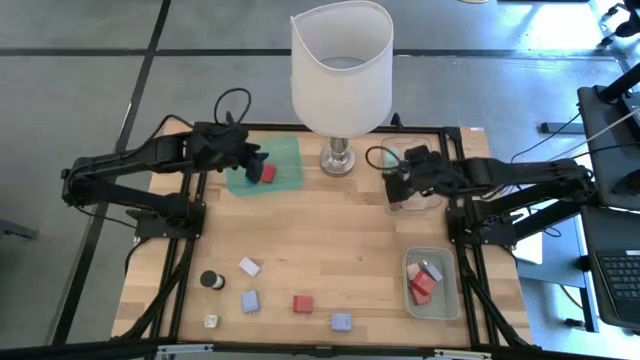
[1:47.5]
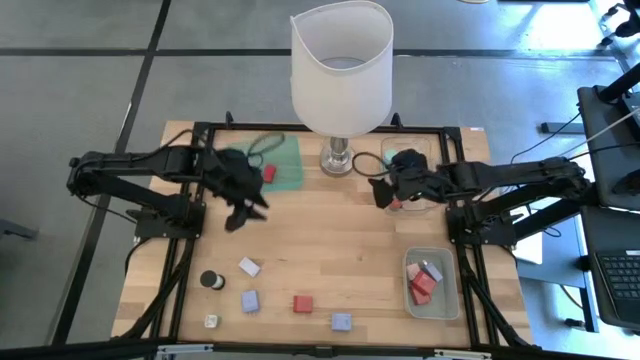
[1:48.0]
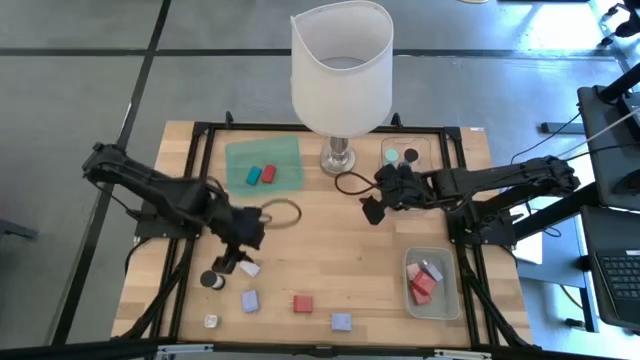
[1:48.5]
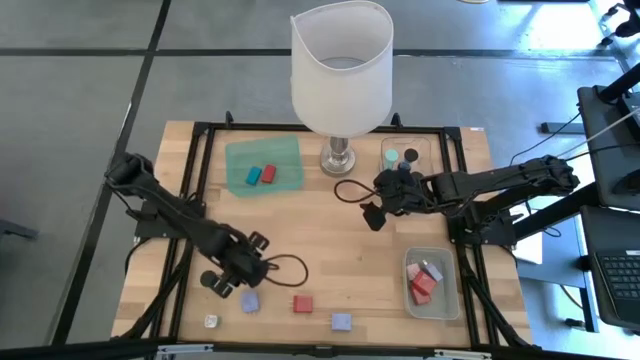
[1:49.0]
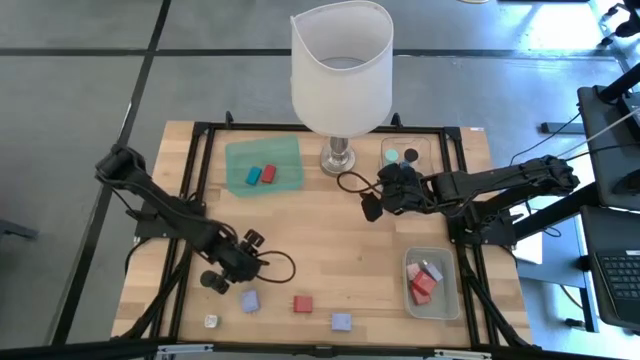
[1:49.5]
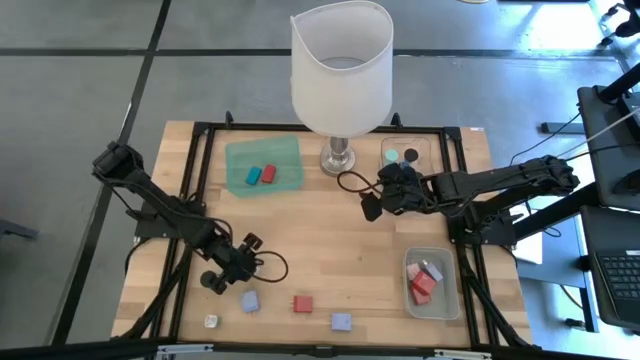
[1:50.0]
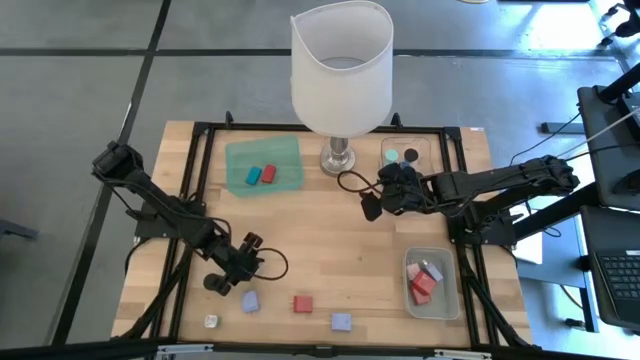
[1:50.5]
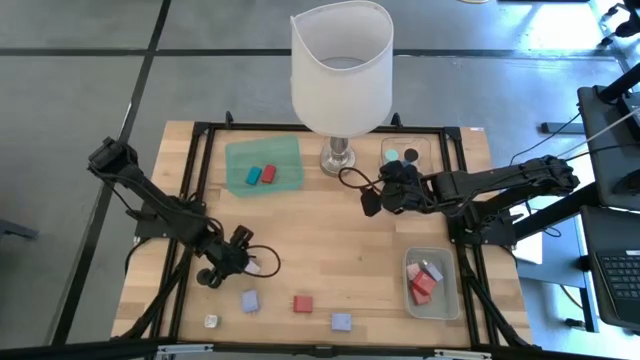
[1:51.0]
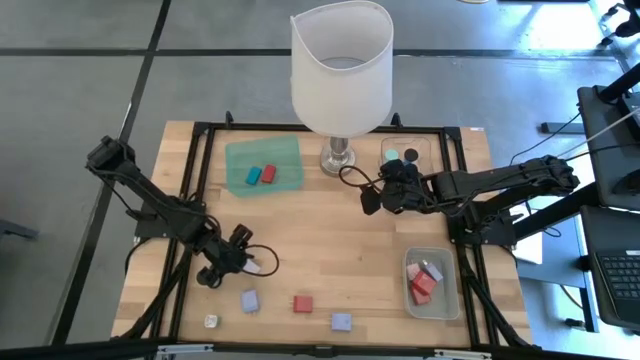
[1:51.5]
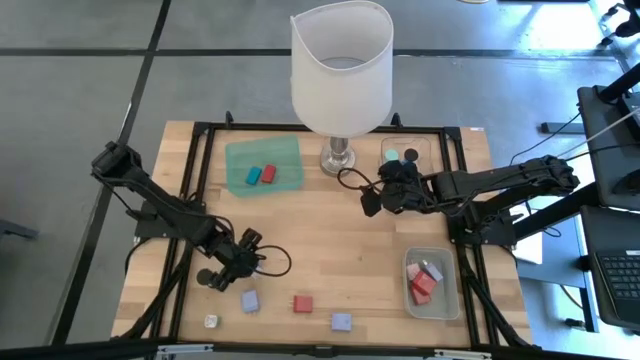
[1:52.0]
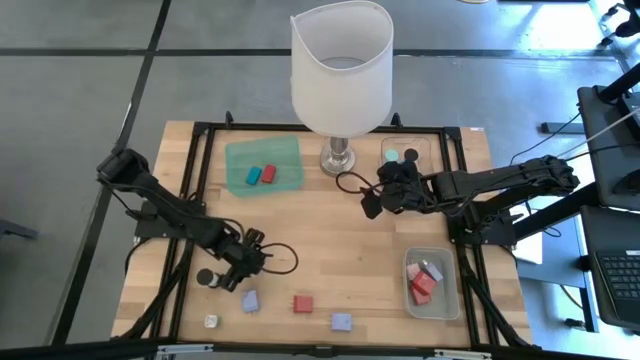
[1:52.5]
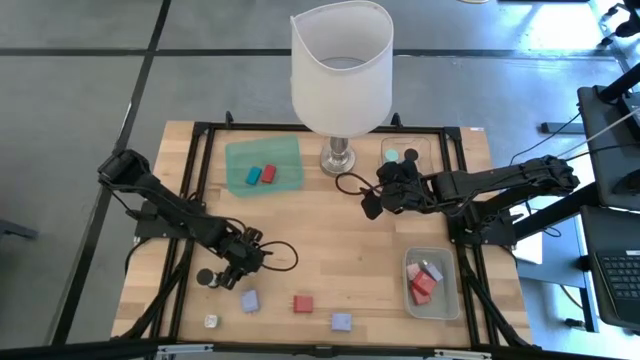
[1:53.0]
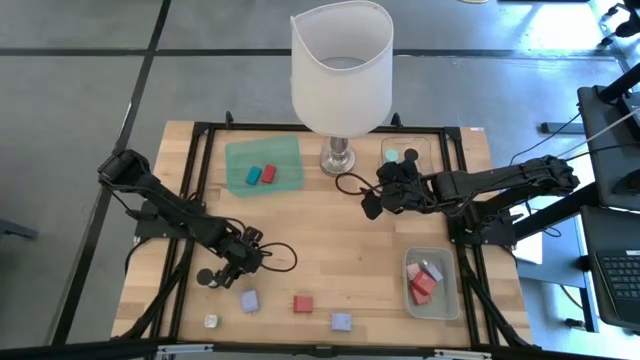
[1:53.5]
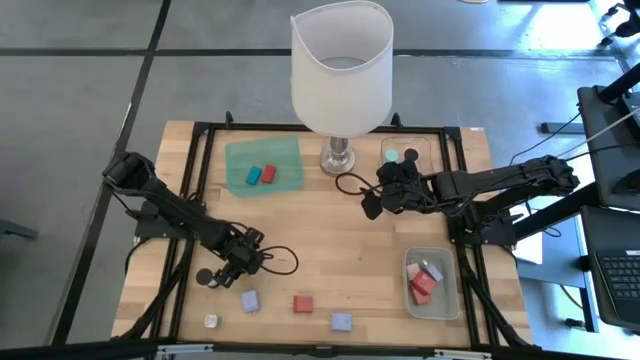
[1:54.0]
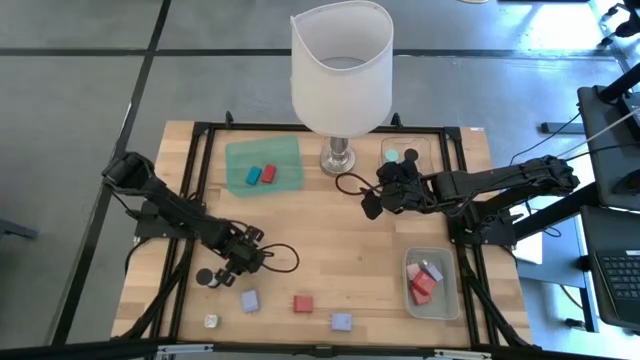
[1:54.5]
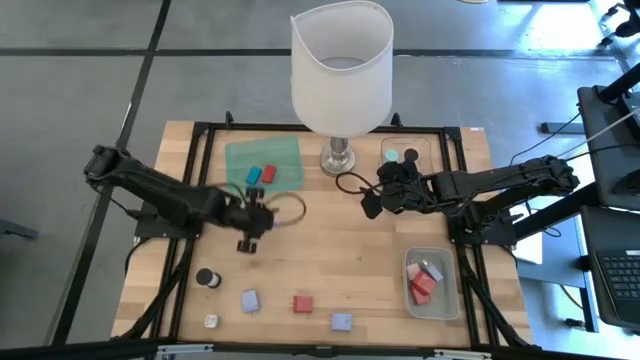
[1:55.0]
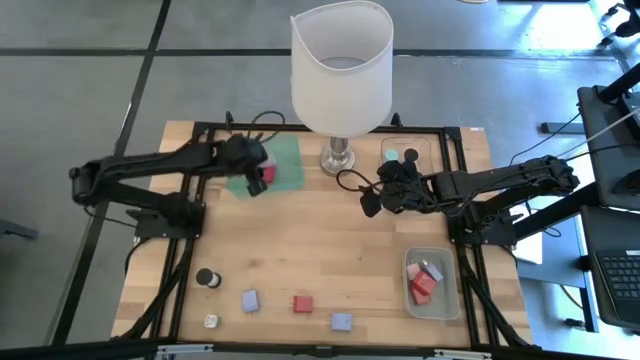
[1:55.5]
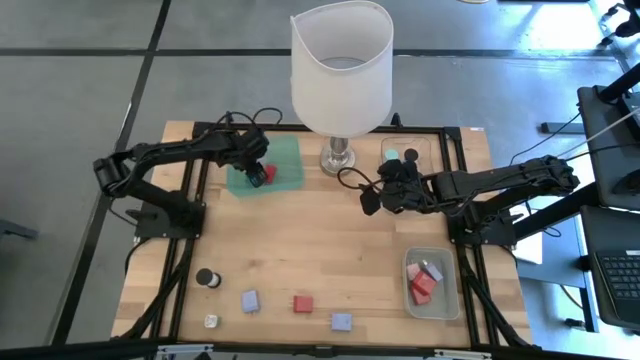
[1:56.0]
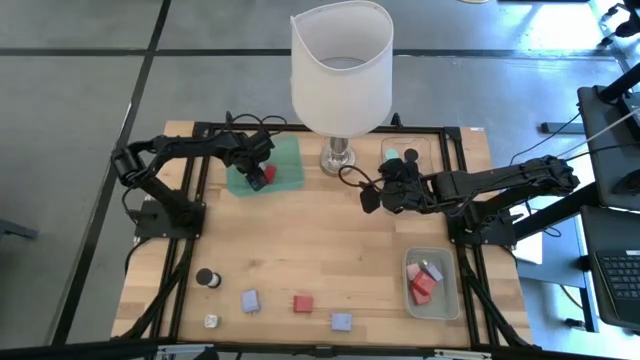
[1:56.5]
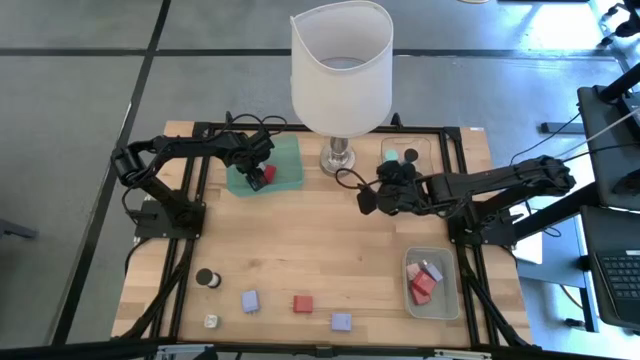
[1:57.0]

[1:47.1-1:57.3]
Task: Pick & Place Office items
Put the white digital timer into the green bin

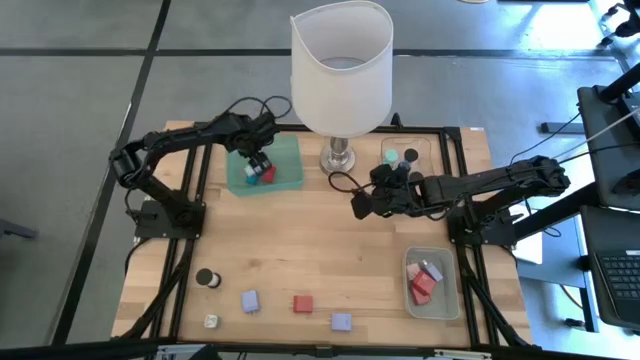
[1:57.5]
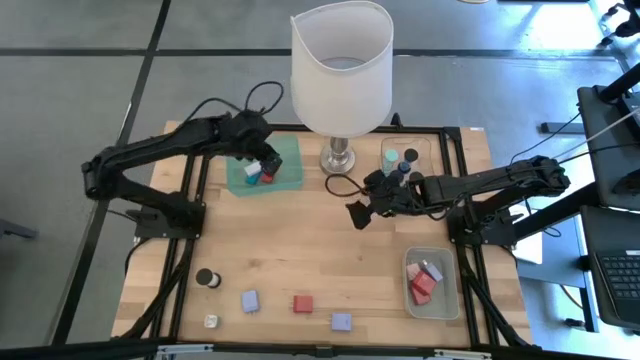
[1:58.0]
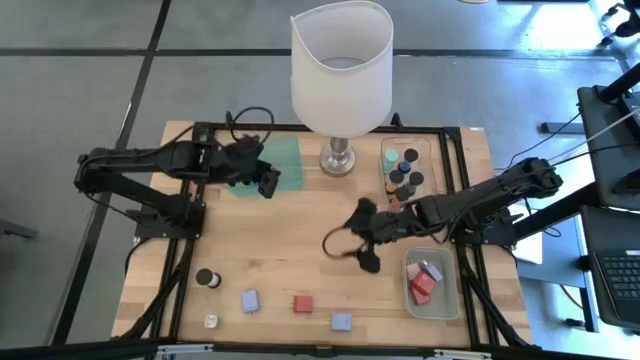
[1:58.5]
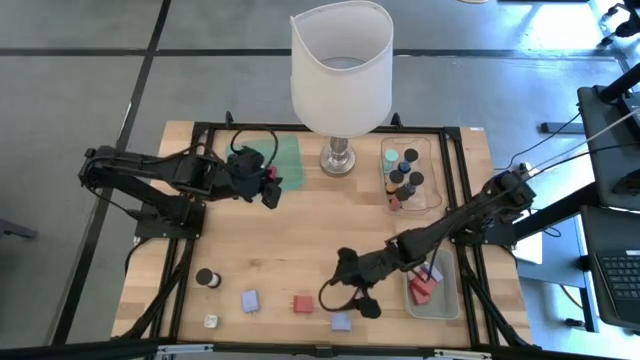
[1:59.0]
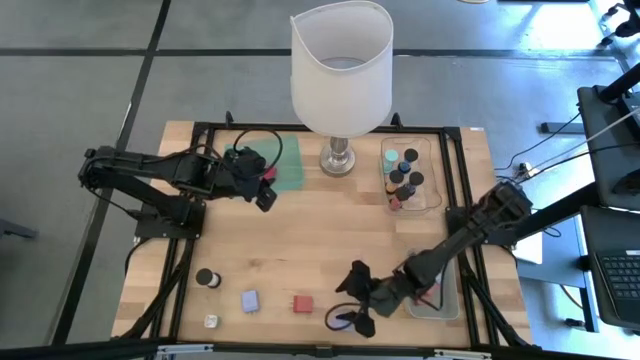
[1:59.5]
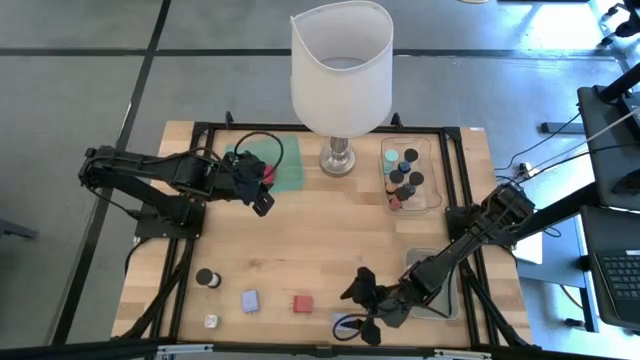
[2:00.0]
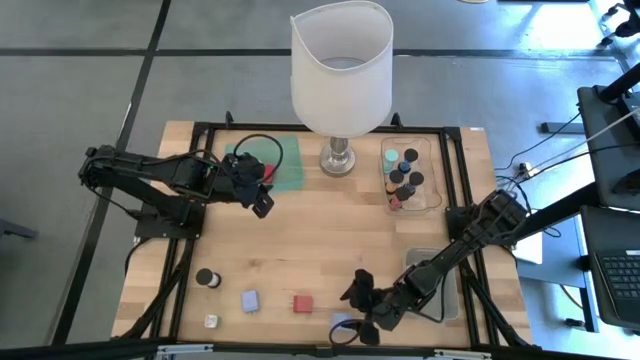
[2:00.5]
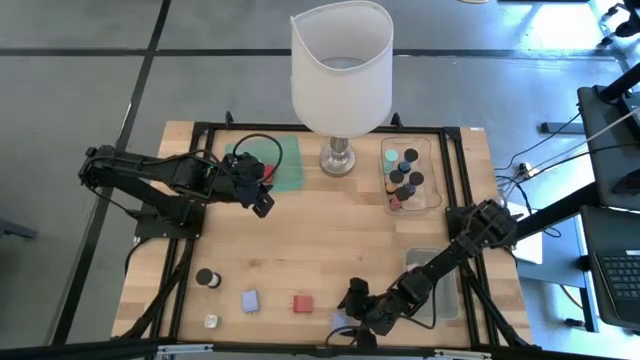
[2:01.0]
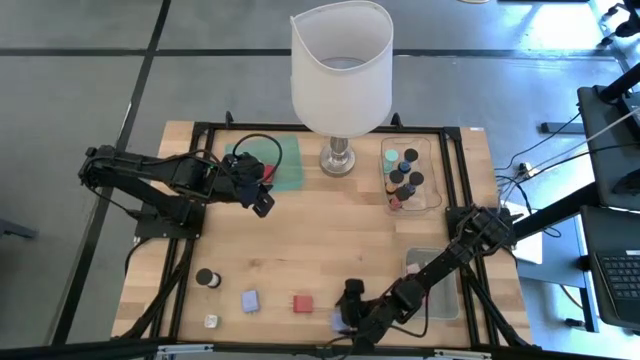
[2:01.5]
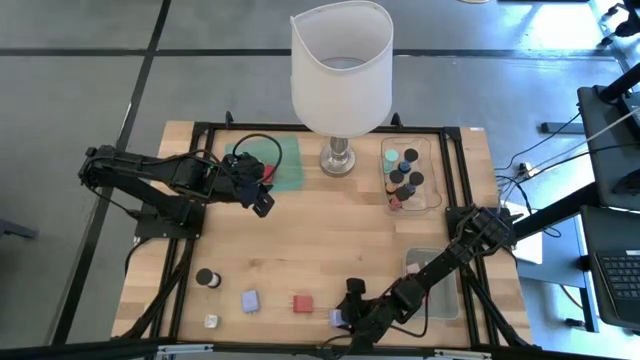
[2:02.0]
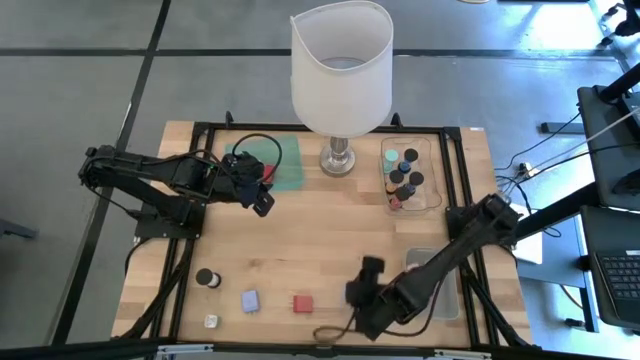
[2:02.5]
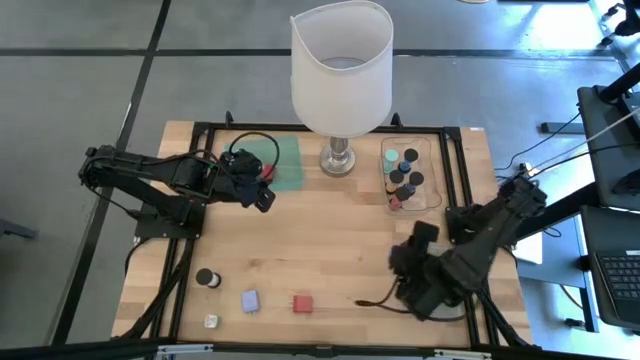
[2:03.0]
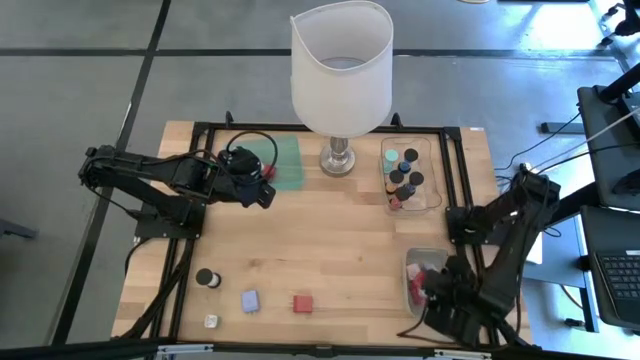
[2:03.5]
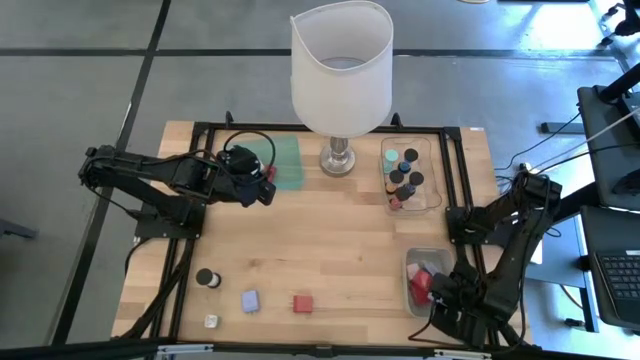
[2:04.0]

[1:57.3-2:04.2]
Put the right violet charger adapter into the gray bin

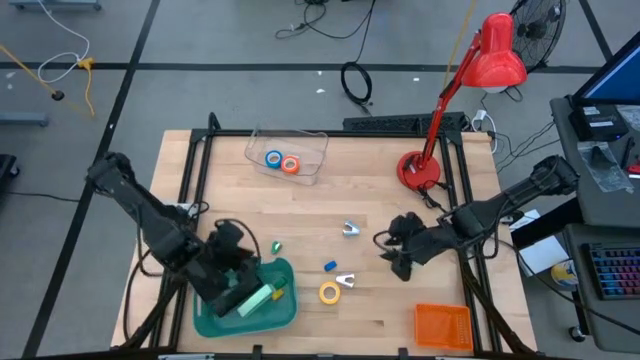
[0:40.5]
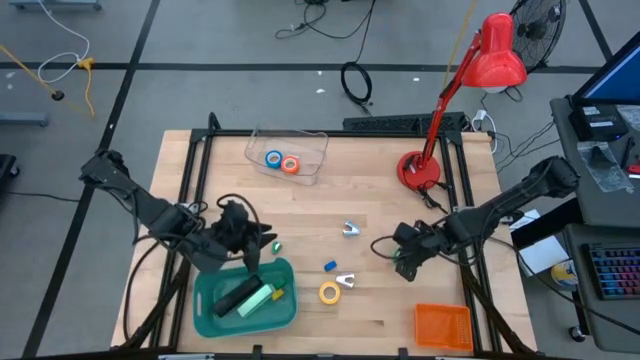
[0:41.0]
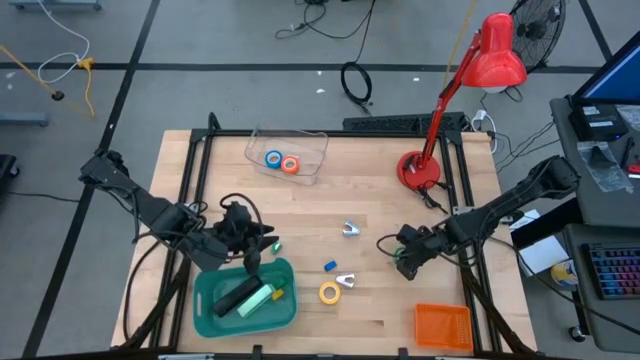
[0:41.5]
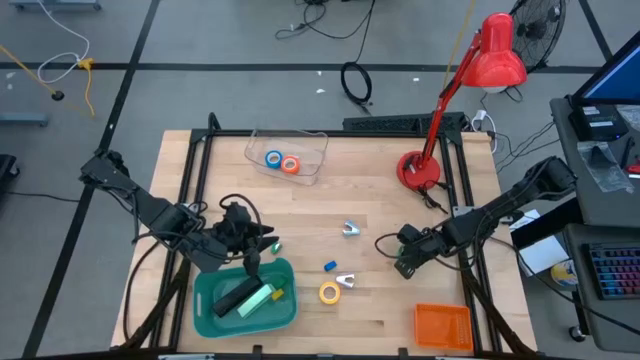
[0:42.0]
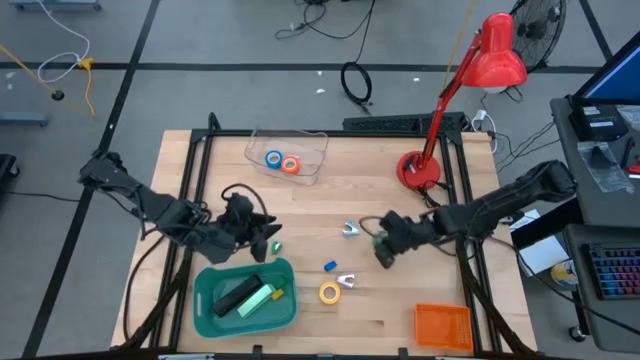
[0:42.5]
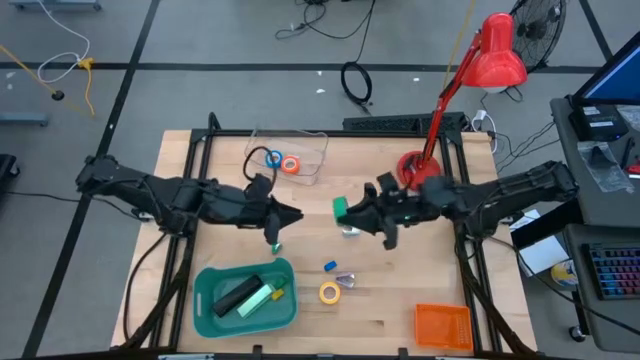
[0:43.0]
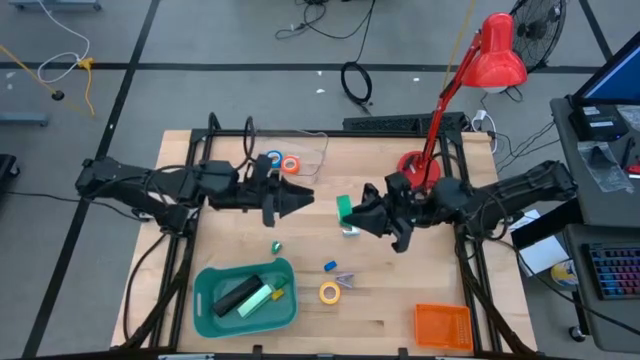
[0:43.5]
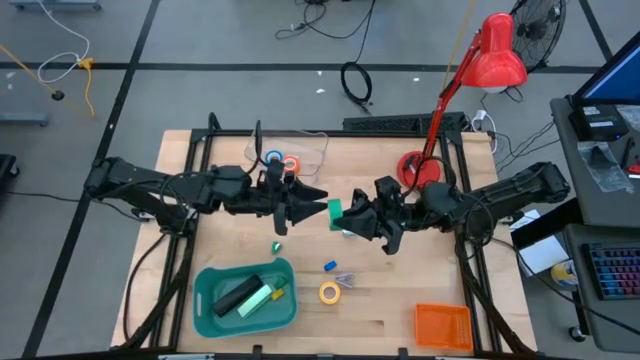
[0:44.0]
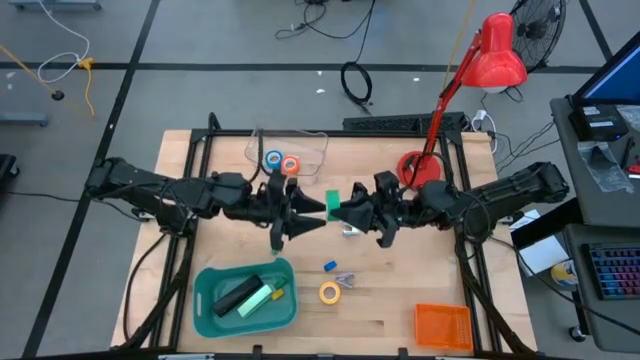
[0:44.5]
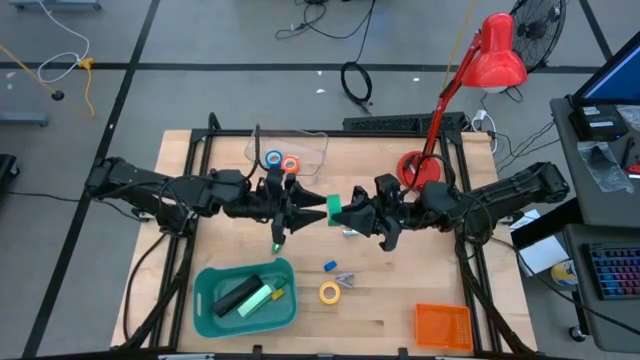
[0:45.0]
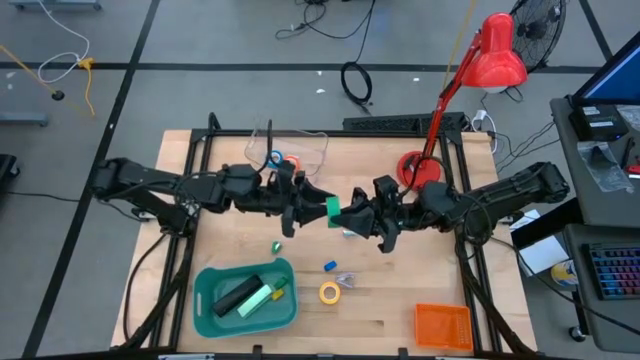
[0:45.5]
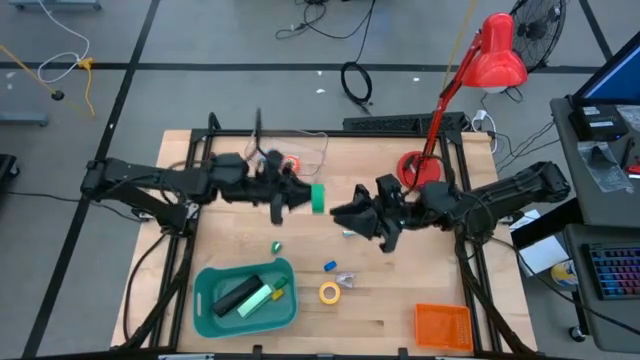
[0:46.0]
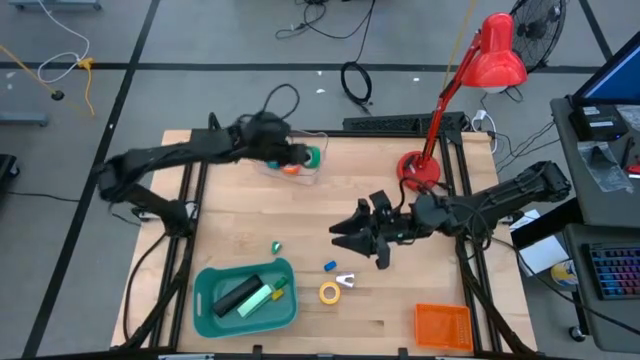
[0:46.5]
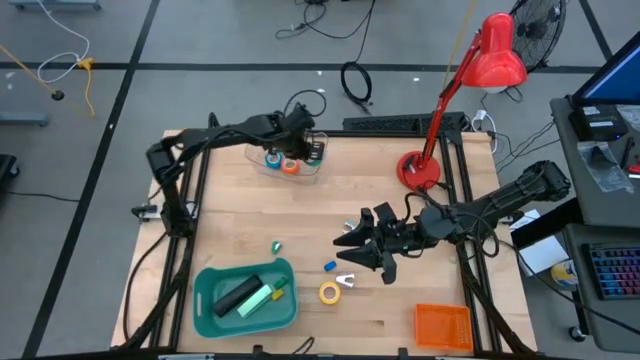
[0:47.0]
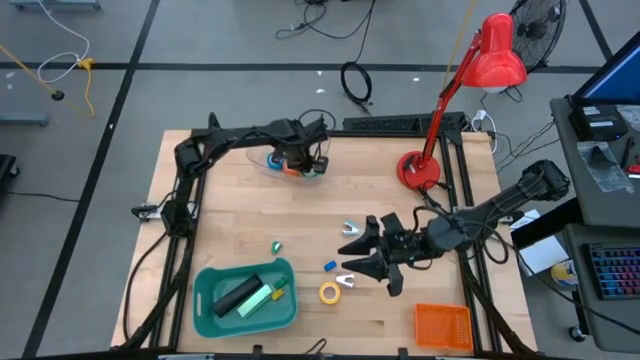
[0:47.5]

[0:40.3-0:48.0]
Task: Pick and place Stapler, Stapler remover, tape
Put the green tape into the transparent bin
